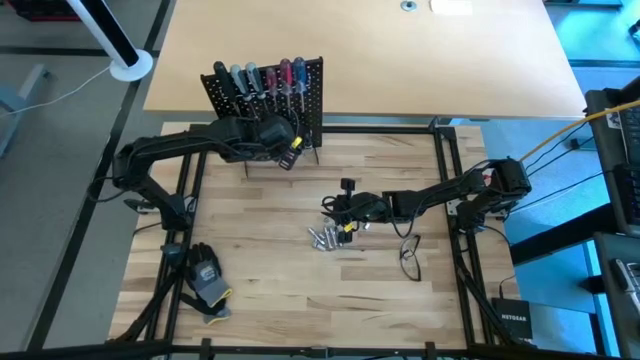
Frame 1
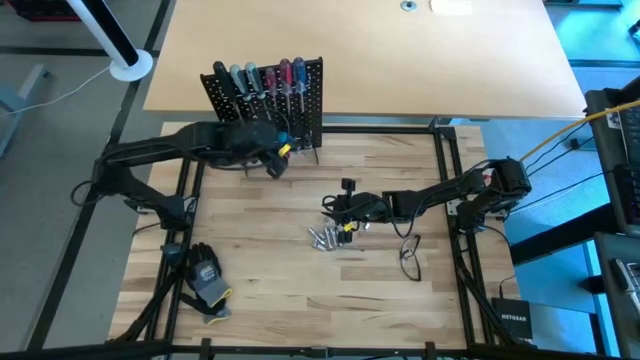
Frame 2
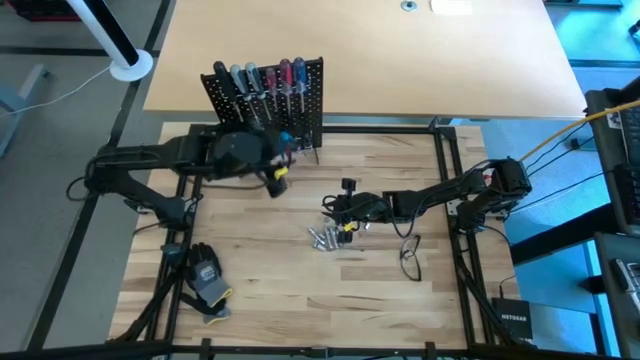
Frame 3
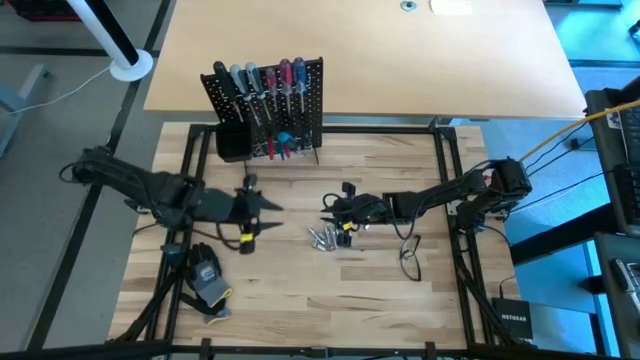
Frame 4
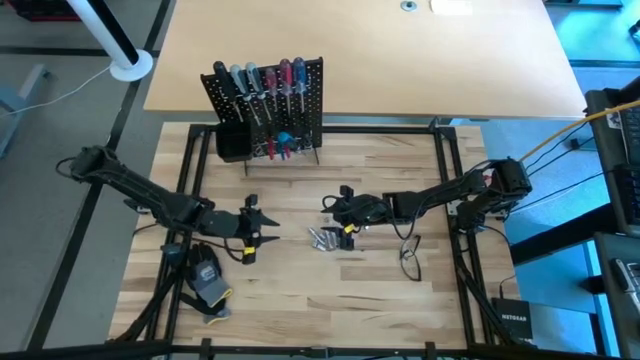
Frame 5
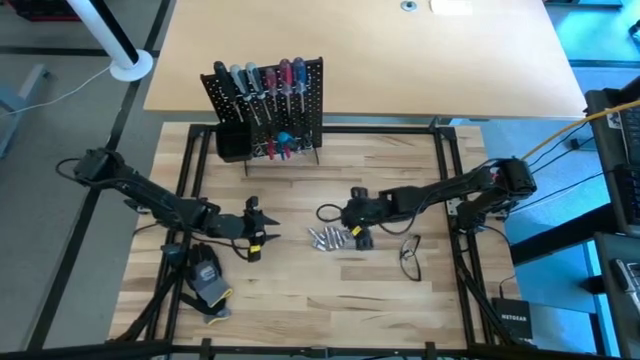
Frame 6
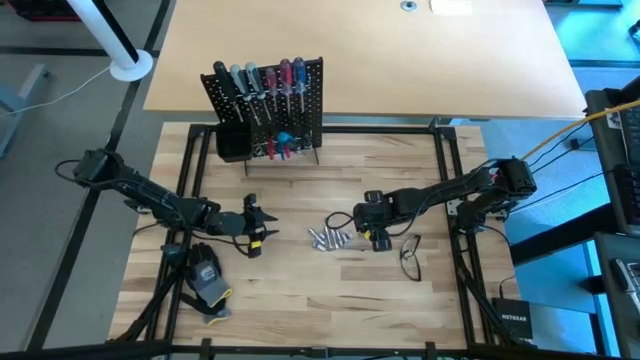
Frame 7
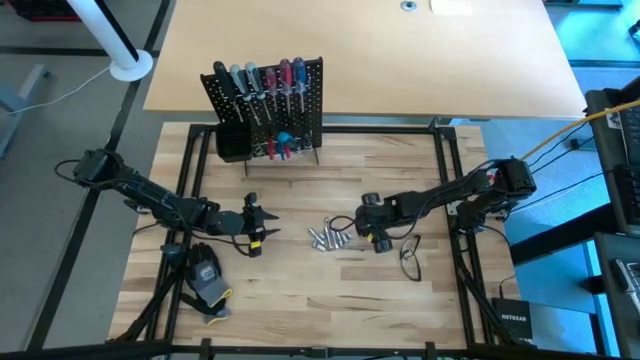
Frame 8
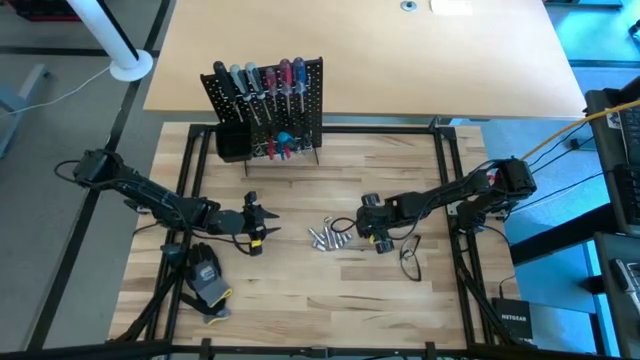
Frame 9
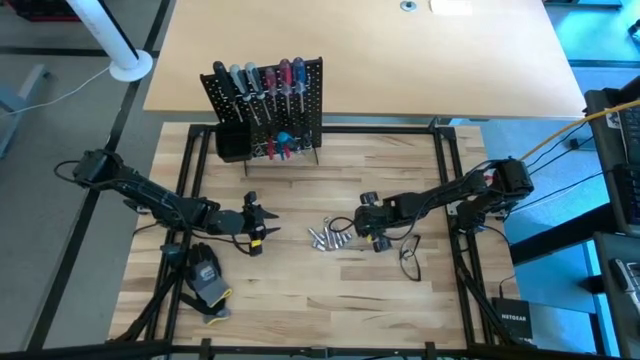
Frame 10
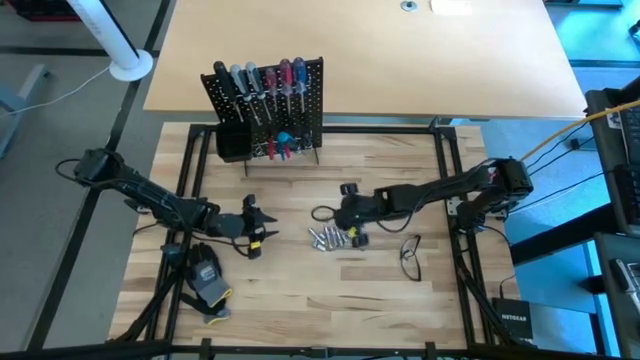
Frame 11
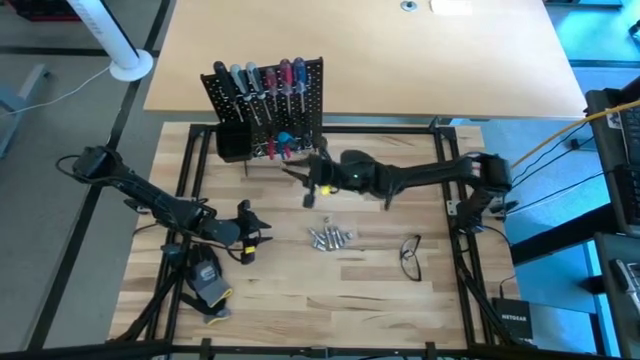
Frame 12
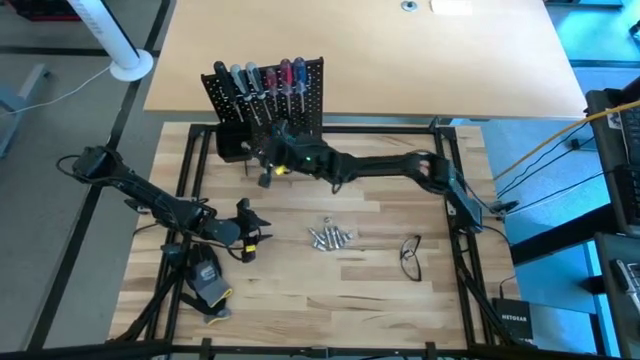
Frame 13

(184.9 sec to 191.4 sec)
Task: Hang tools onto peg board
Put the socket into the black bin on the peg board

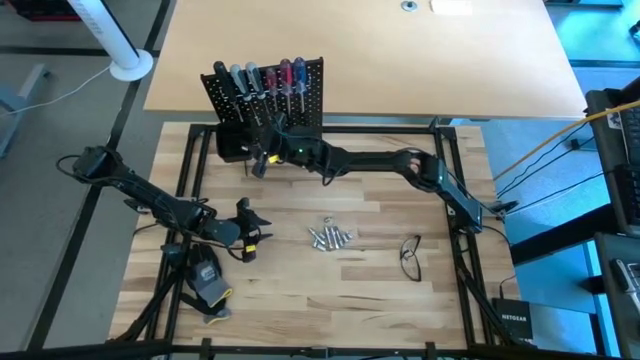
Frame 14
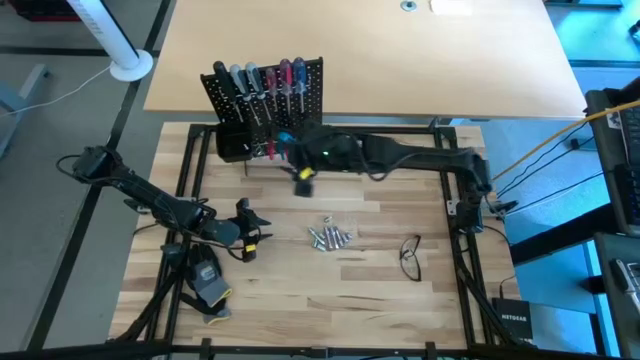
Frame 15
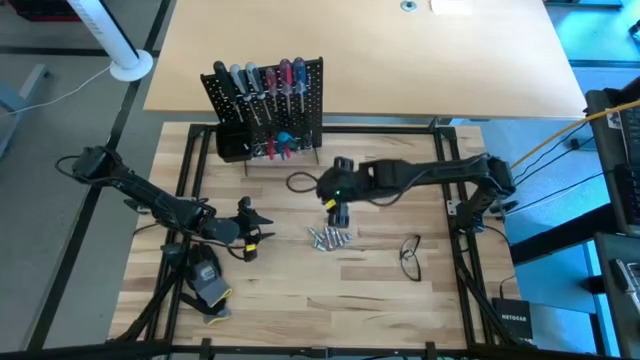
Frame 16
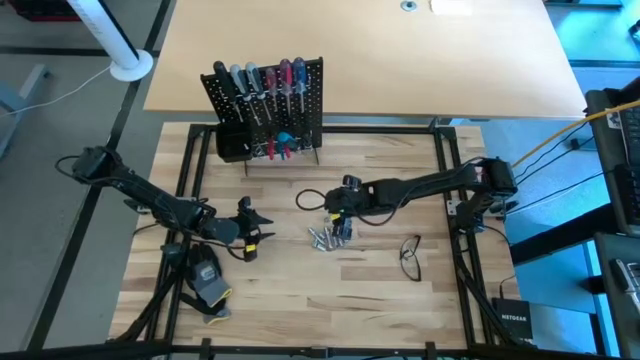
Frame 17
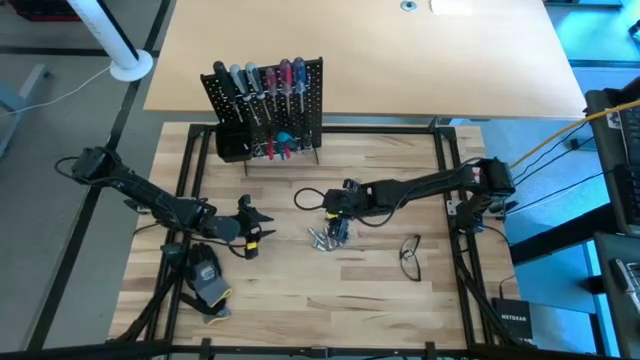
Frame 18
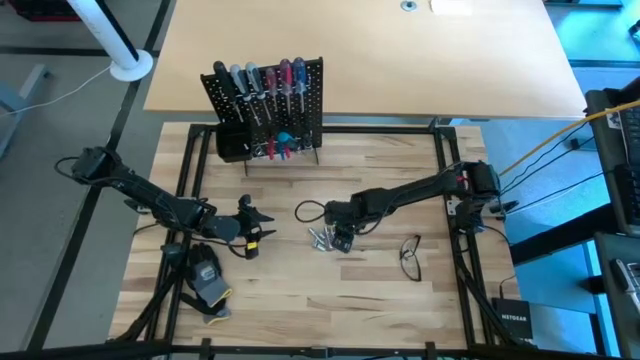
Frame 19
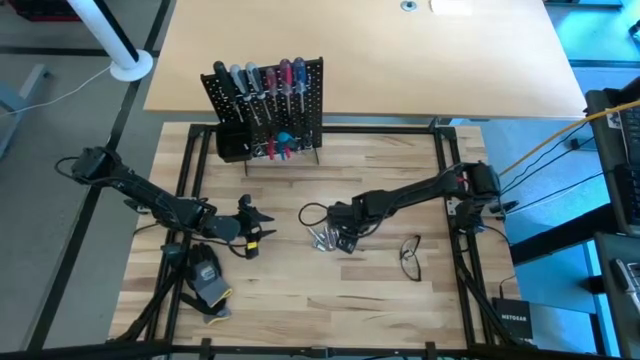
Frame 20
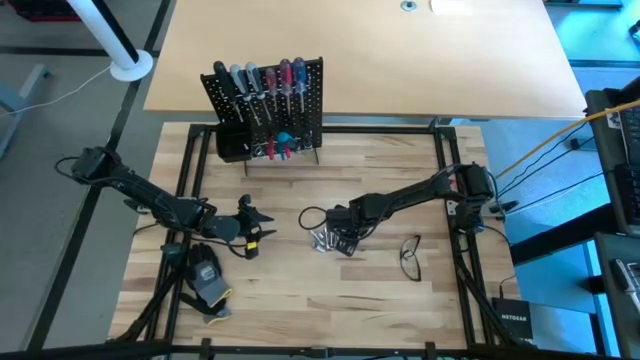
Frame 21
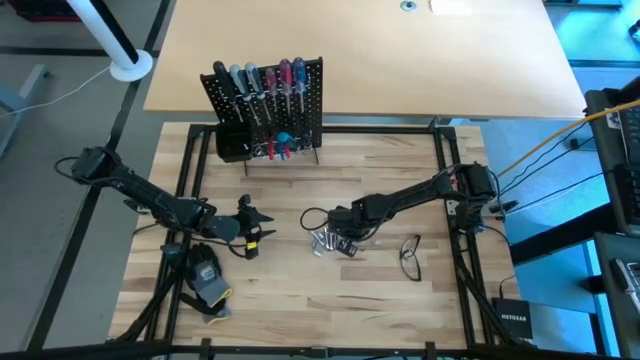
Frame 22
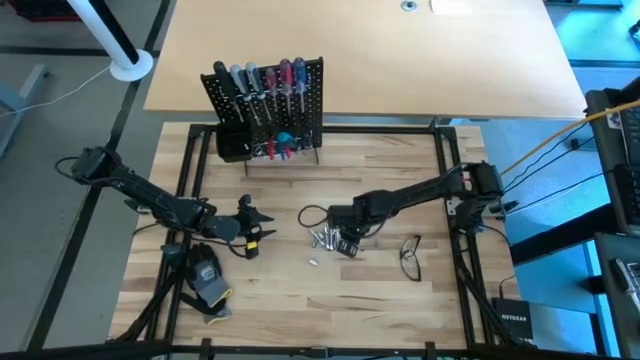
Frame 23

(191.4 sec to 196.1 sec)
Put the socket into the black bin on the peg board

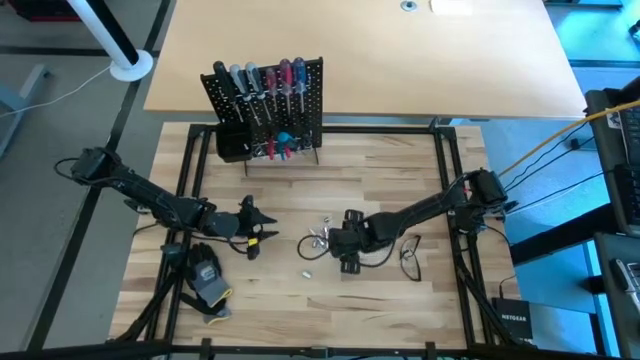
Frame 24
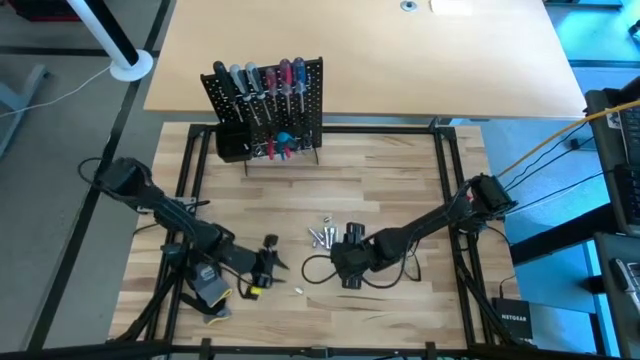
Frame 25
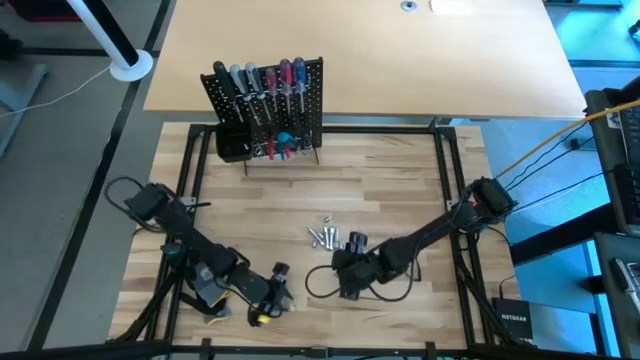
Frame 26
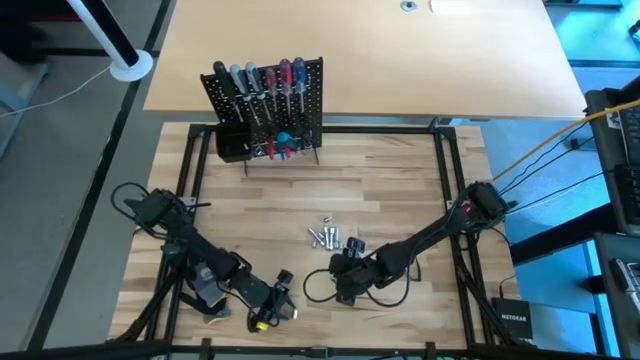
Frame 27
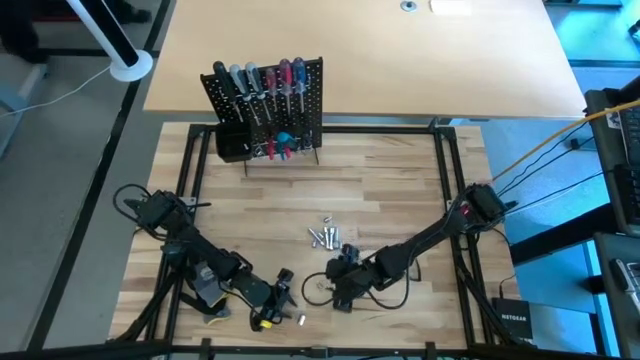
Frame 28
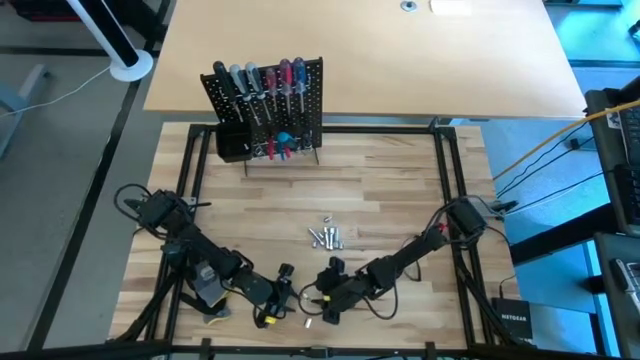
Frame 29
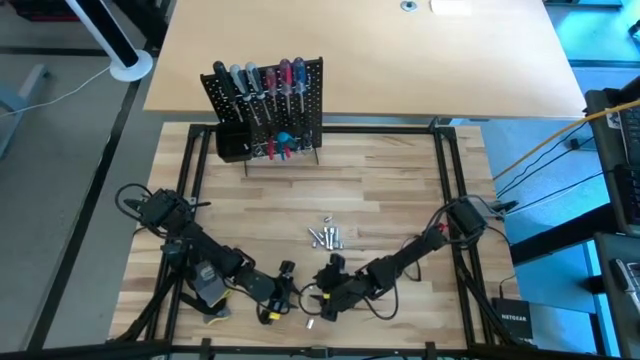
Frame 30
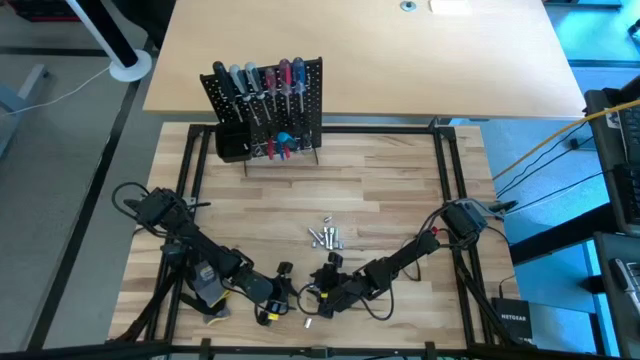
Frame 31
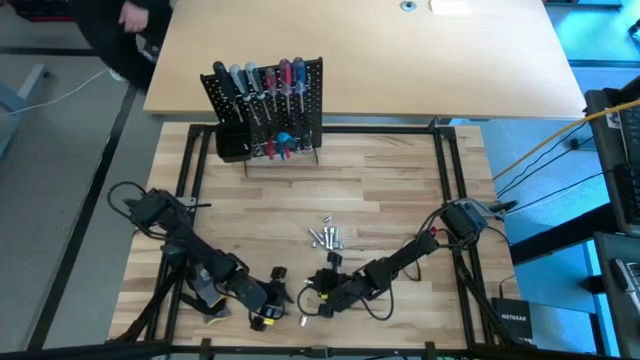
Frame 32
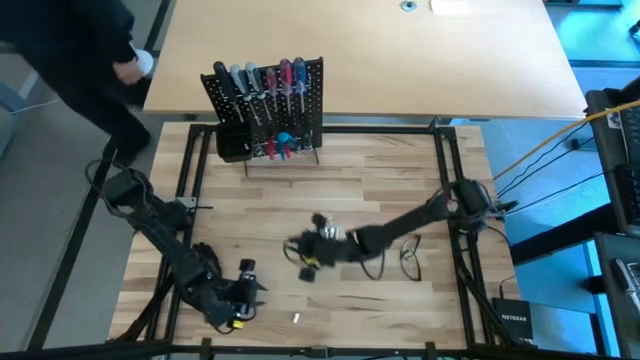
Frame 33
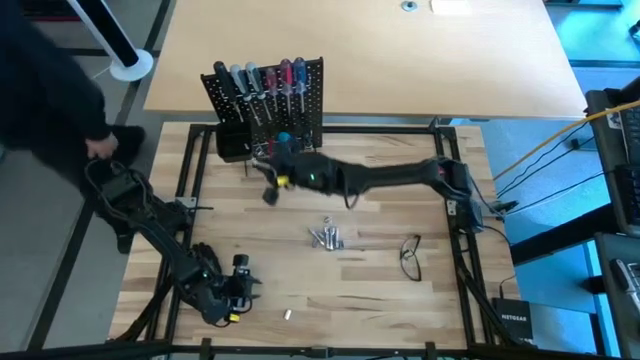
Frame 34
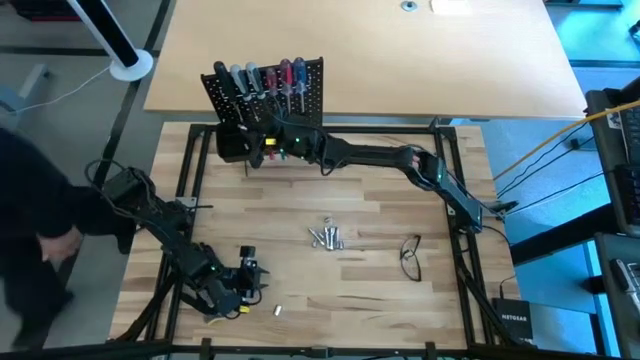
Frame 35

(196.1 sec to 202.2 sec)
Put the socket into the black bin on the peg board

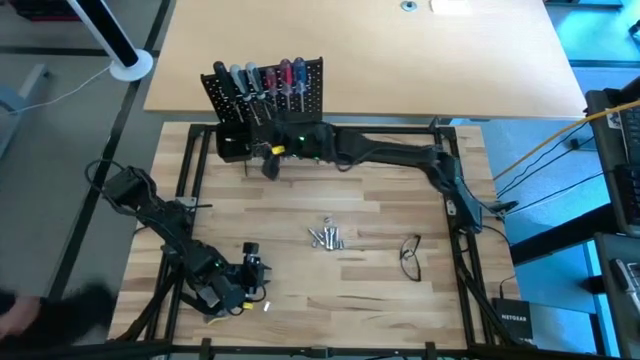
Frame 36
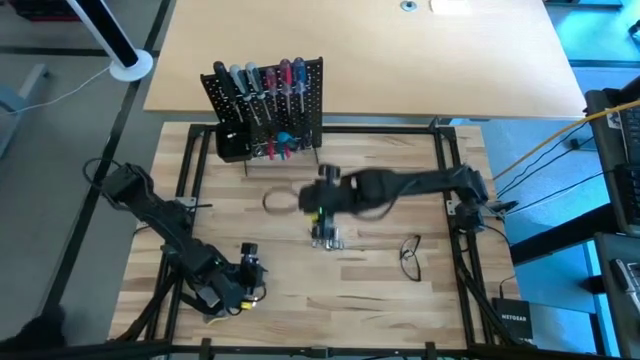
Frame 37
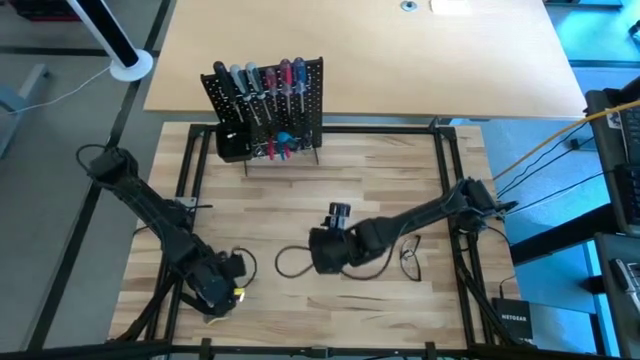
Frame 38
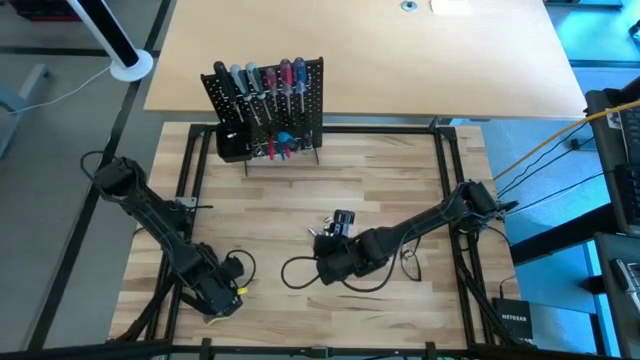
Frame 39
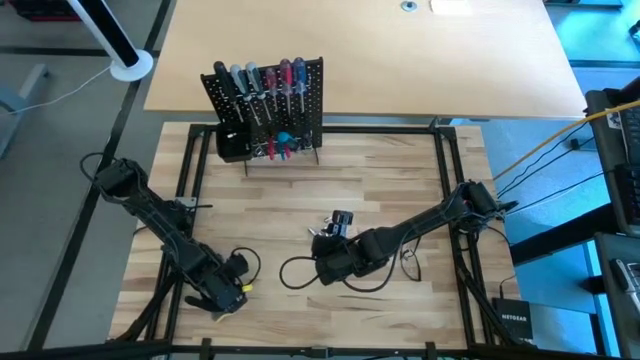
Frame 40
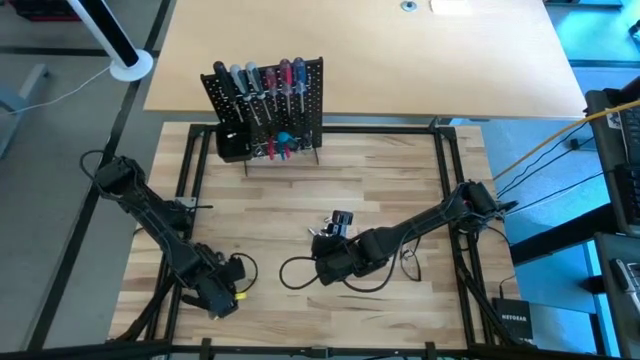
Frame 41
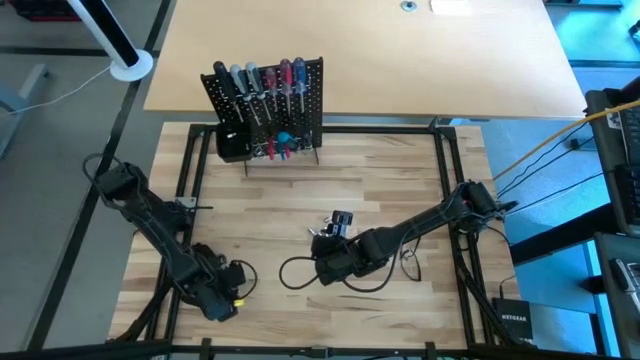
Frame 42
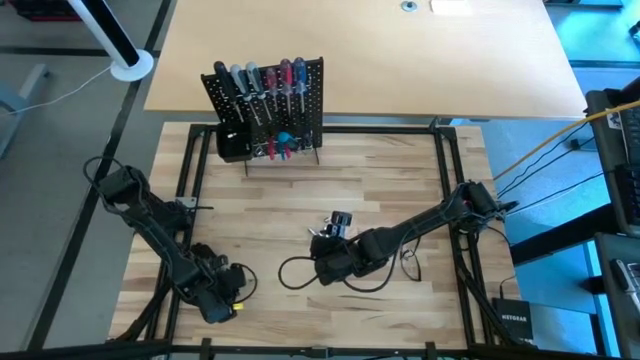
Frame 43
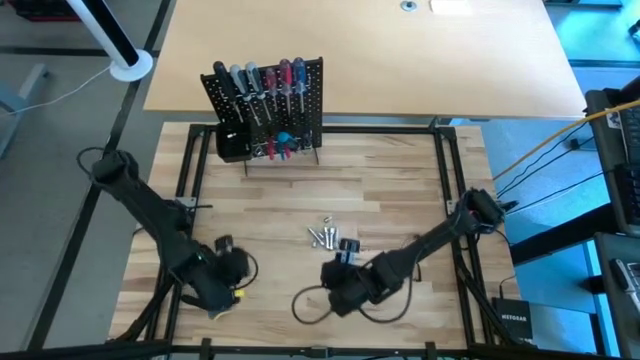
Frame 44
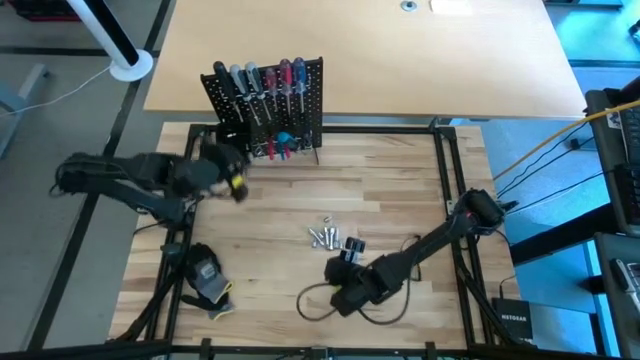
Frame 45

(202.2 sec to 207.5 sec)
Put the socket into the black bin on the peg board
